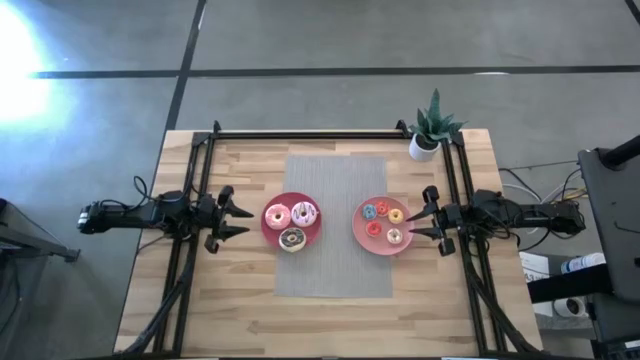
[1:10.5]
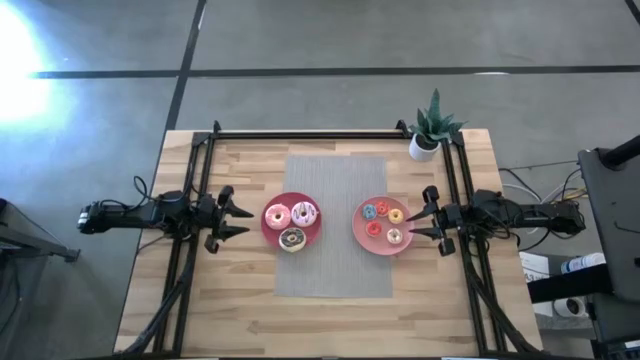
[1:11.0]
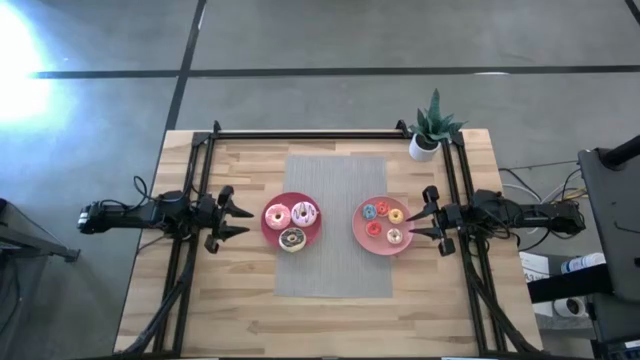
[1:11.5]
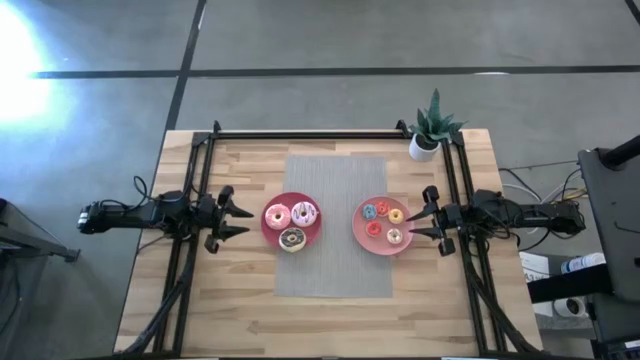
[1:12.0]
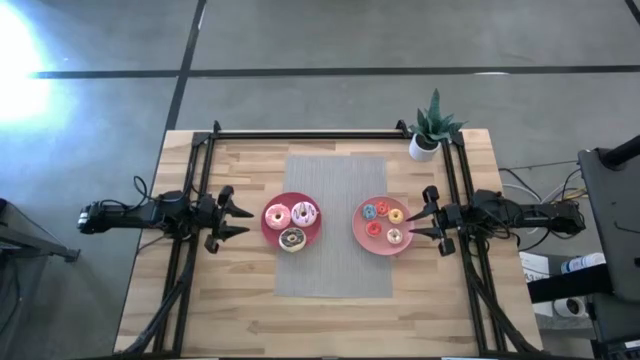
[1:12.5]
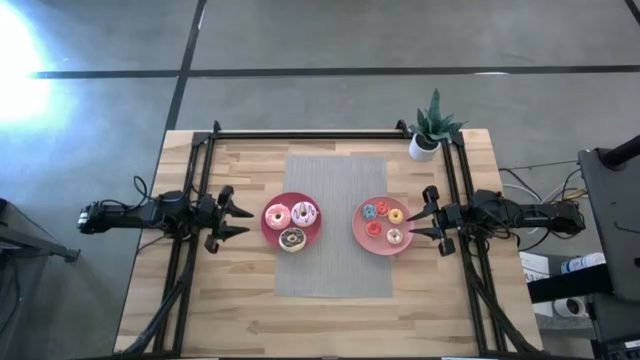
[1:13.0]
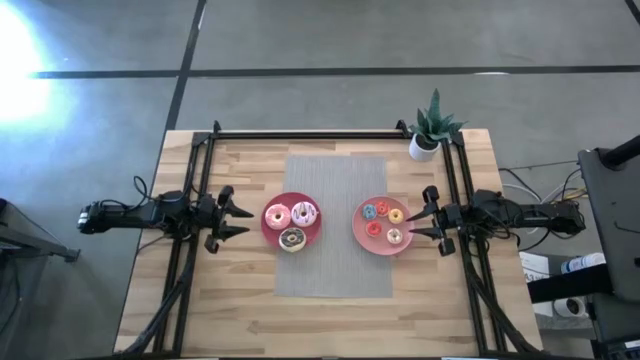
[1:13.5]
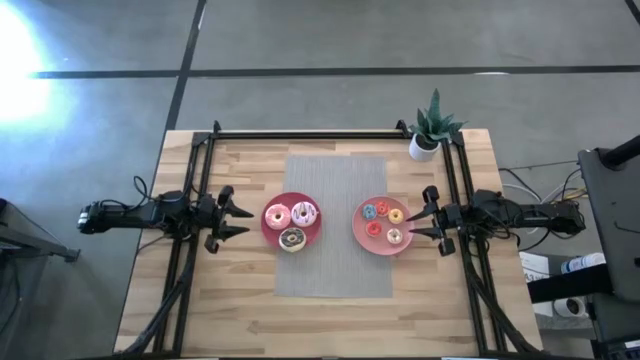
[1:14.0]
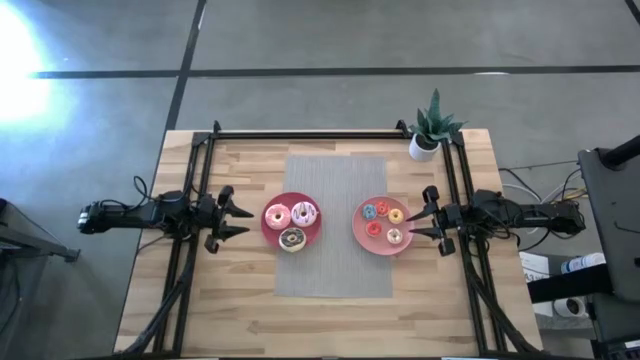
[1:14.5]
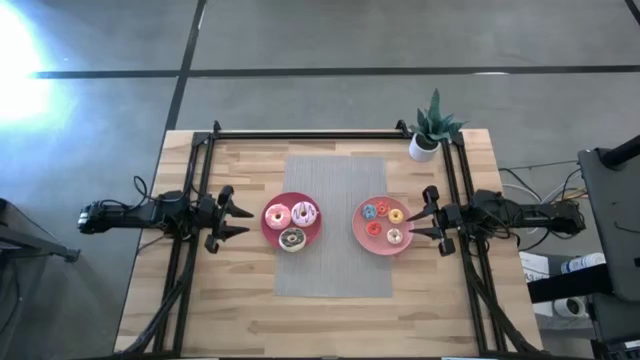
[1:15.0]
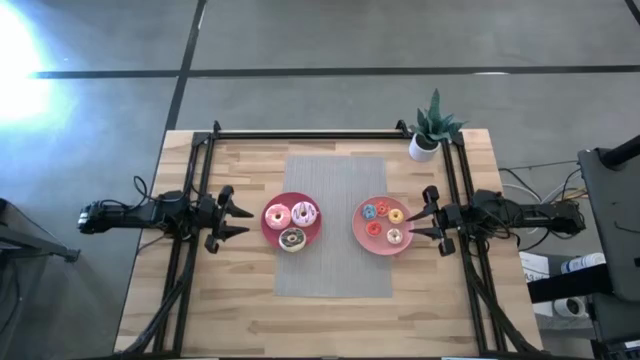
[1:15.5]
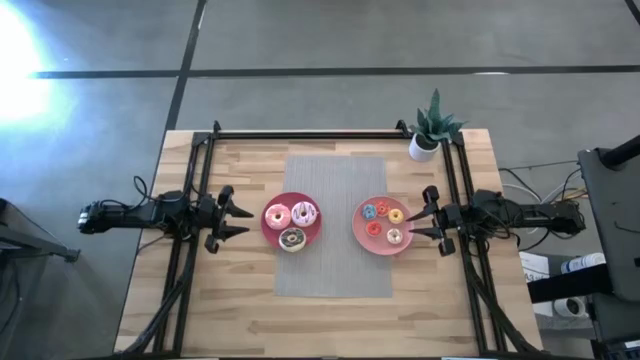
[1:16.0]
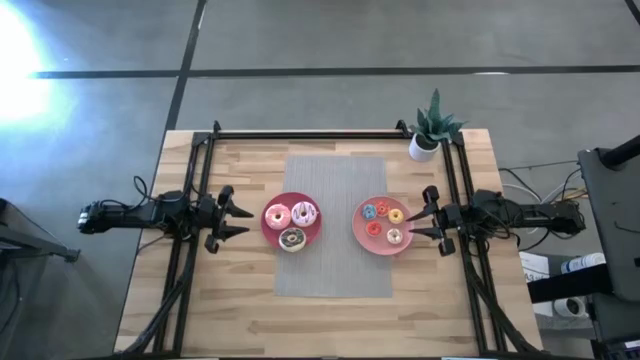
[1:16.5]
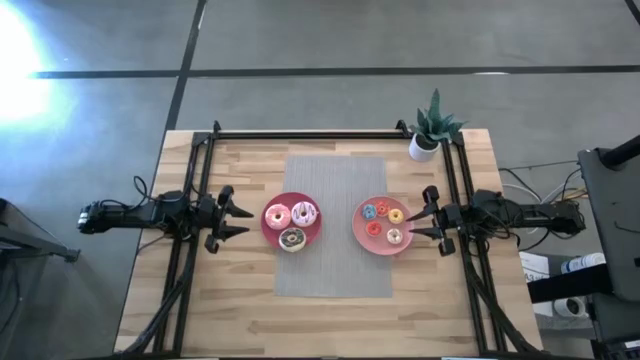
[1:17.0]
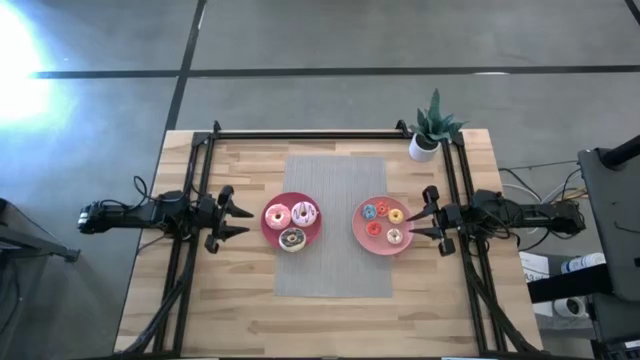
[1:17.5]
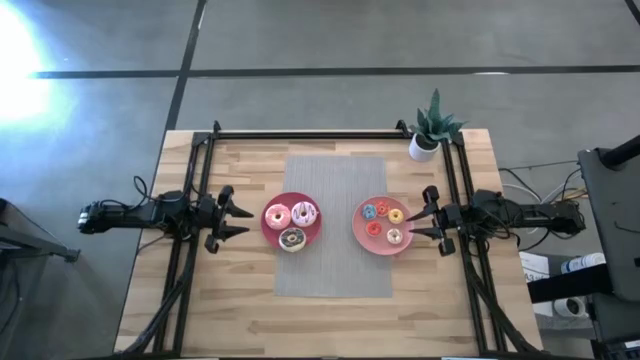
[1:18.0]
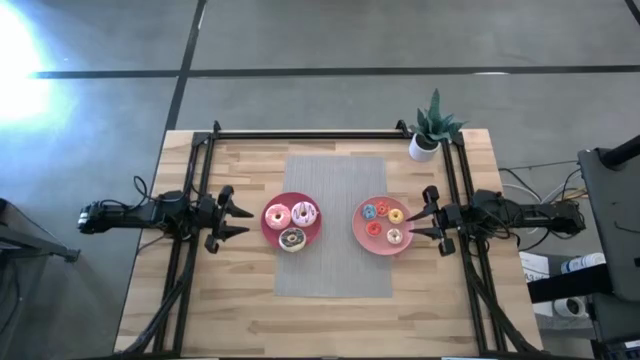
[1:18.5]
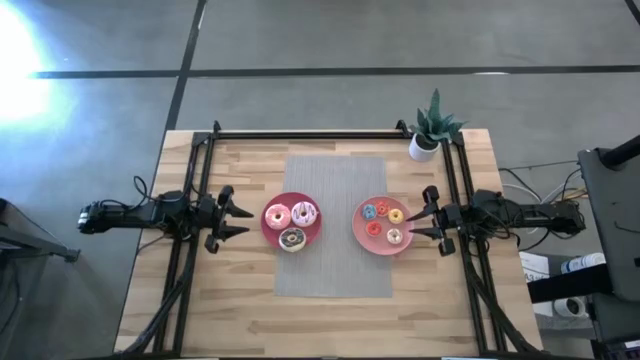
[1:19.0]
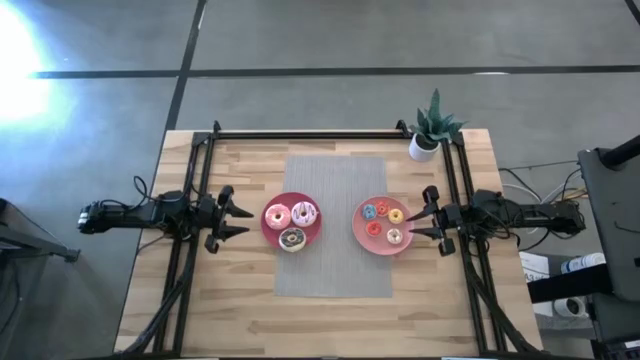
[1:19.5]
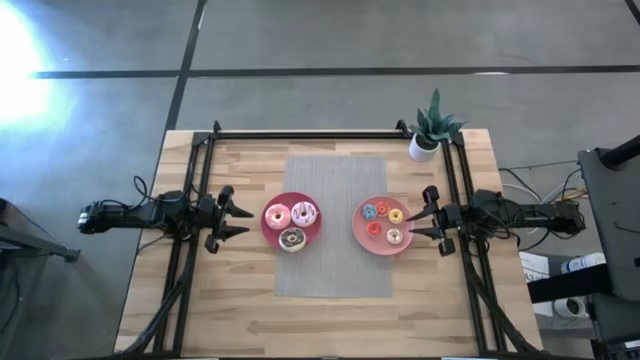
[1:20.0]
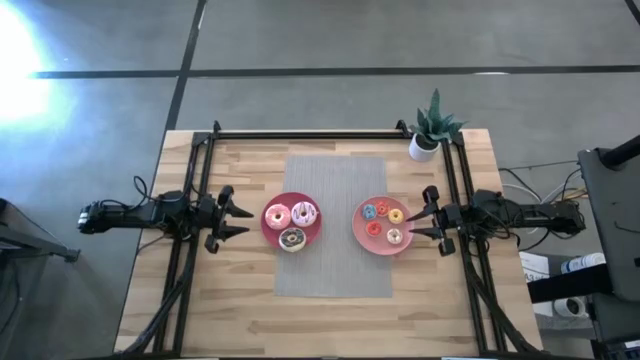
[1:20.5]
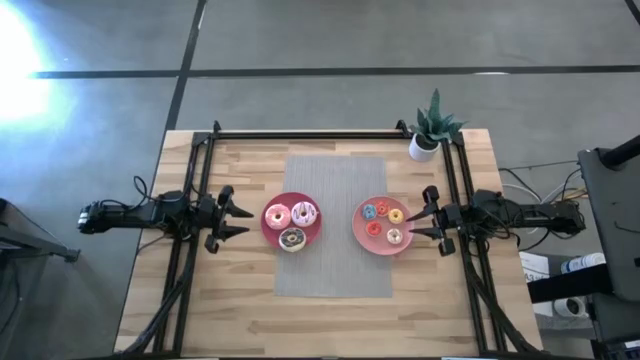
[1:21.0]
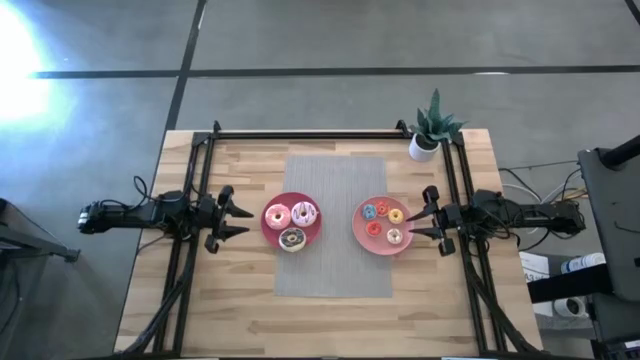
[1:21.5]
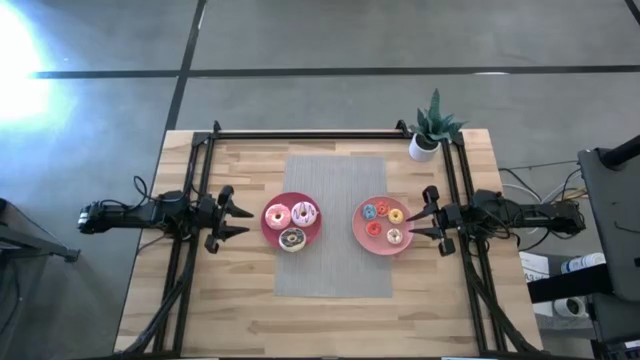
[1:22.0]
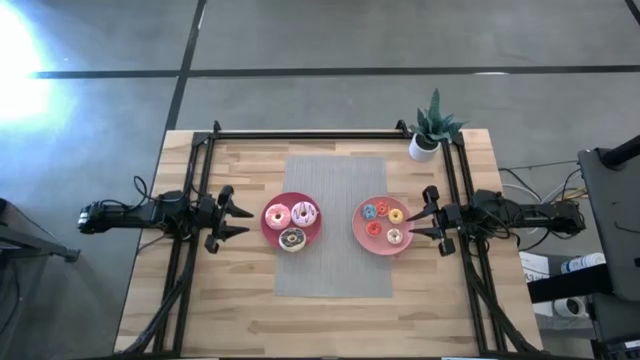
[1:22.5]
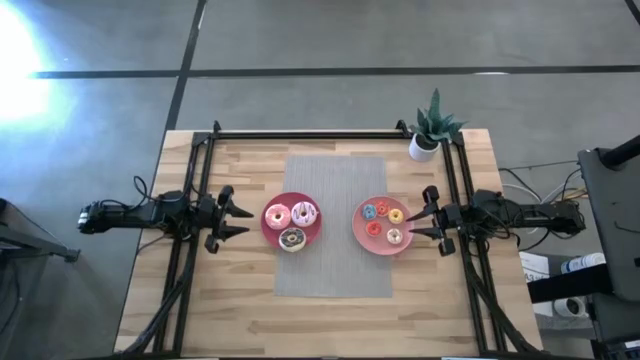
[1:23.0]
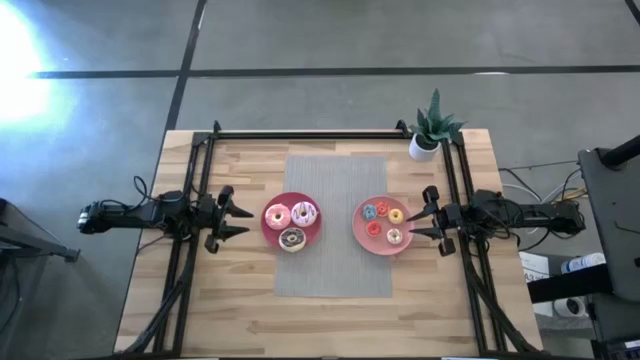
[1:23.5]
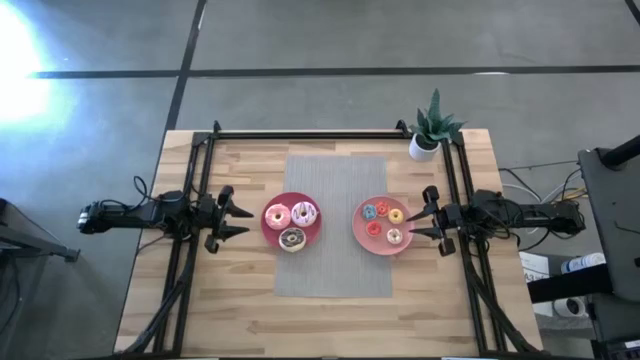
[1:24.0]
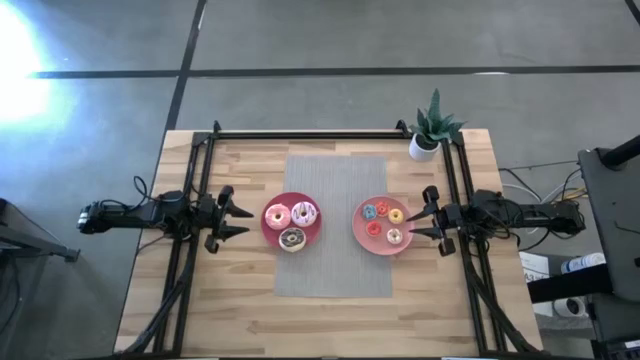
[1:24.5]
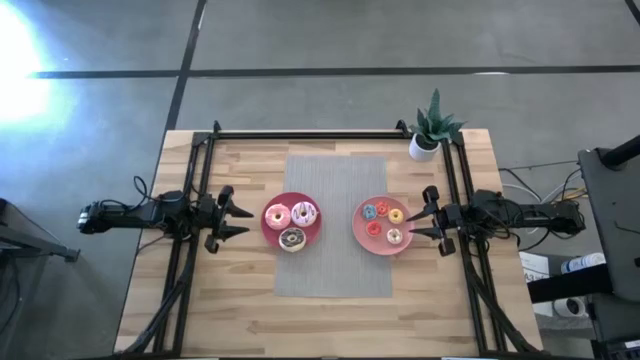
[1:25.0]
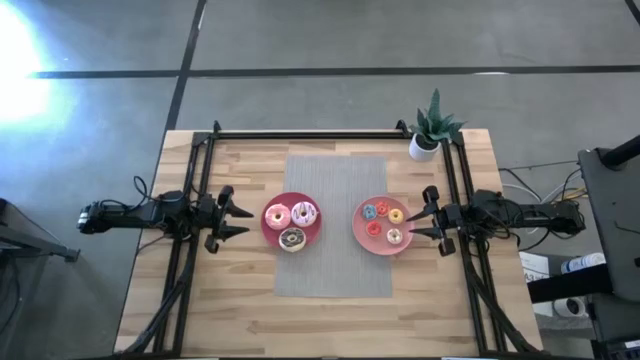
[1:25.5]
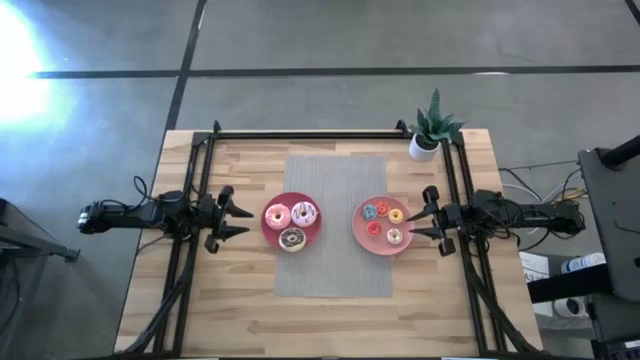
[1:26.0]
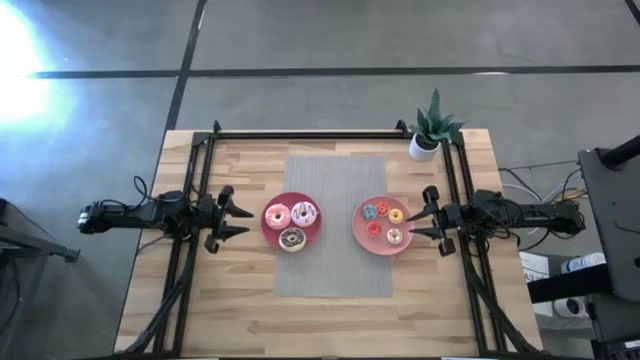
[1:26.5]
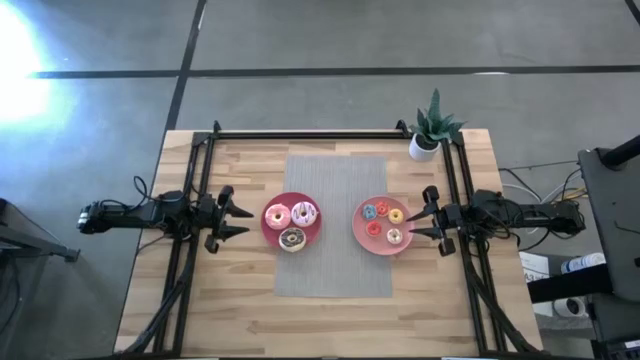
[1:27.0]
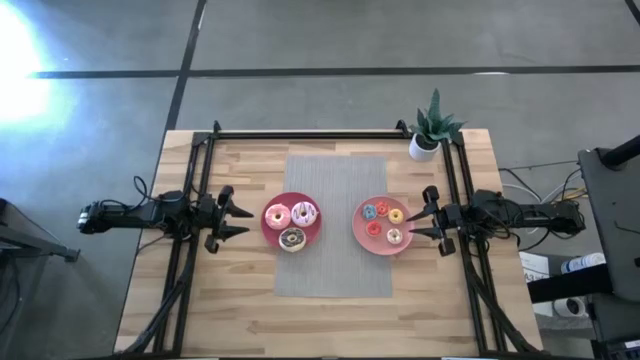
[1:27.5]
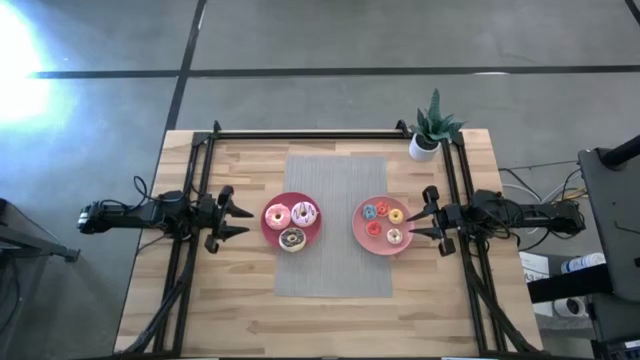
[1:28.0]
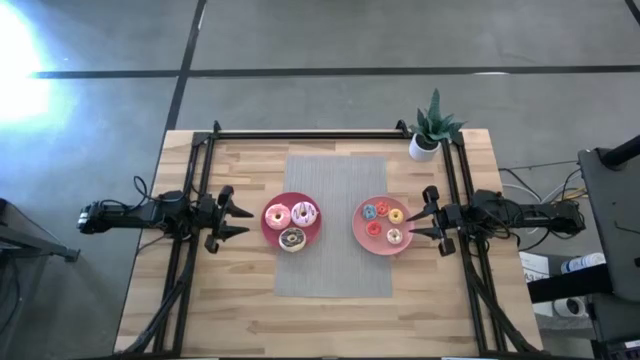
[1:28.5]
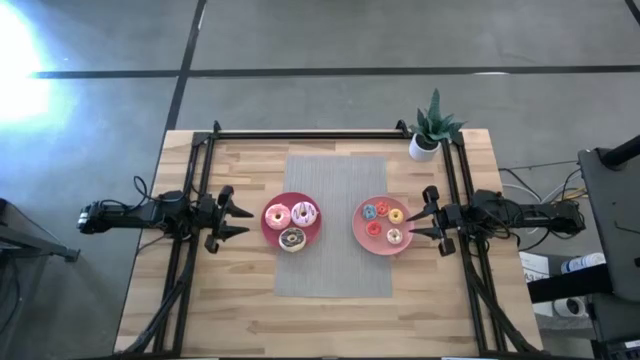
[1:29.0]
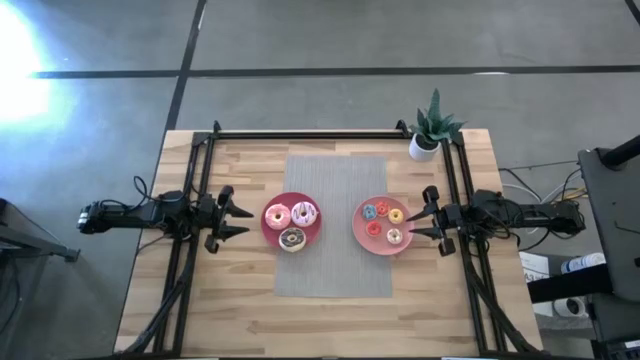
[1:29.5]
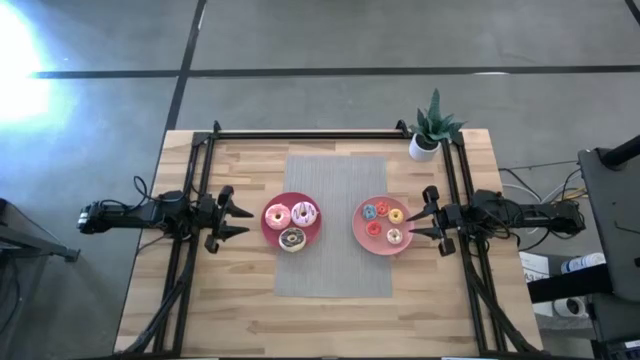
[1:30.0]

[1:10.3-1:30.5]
Task: Pick & Place donuts
Return to Home Position
